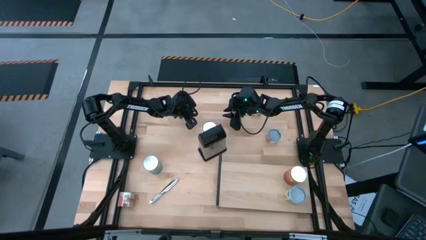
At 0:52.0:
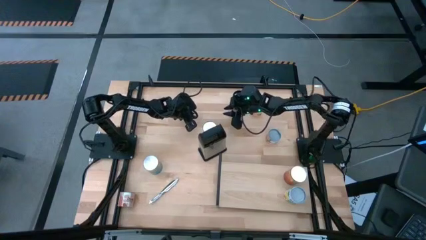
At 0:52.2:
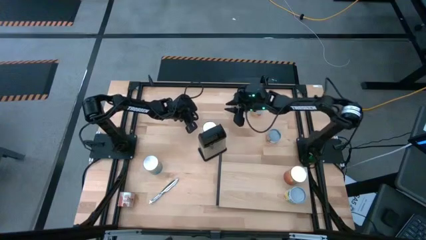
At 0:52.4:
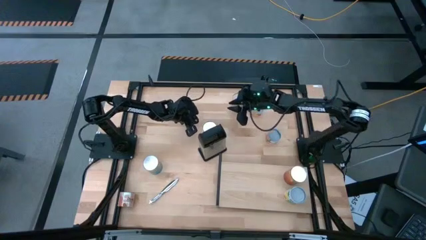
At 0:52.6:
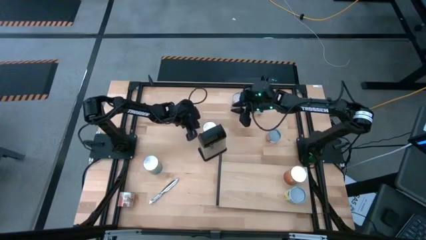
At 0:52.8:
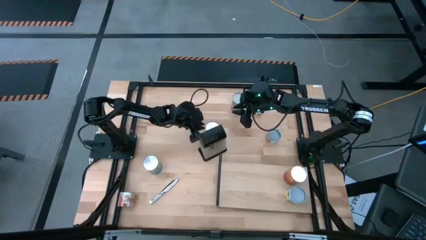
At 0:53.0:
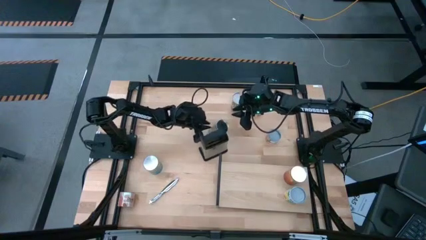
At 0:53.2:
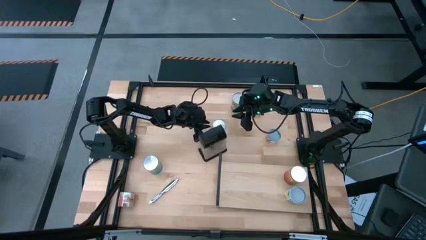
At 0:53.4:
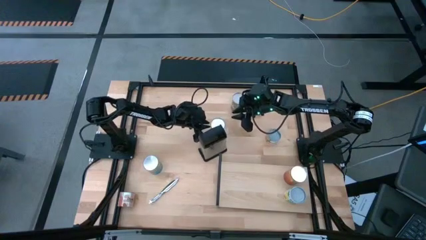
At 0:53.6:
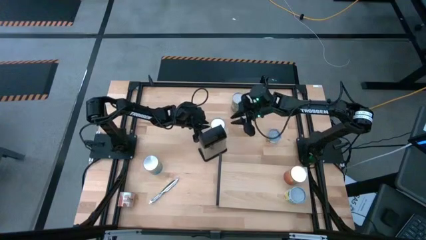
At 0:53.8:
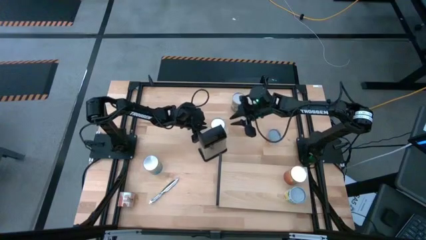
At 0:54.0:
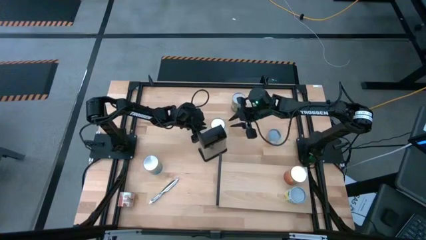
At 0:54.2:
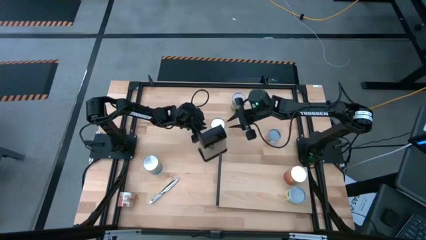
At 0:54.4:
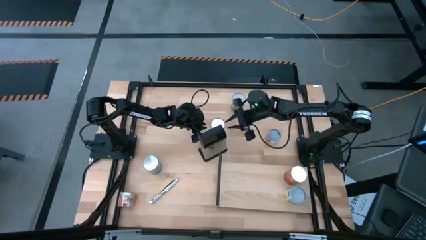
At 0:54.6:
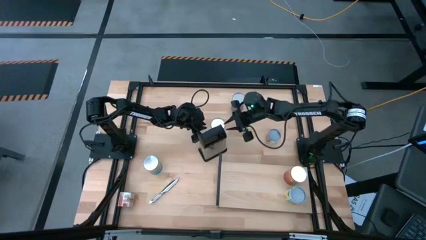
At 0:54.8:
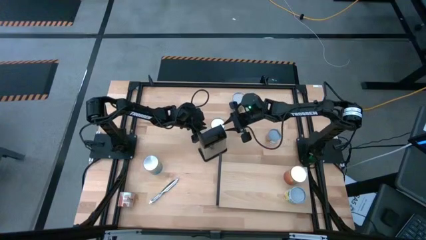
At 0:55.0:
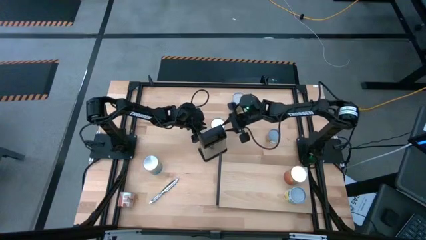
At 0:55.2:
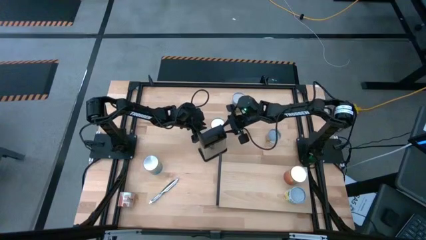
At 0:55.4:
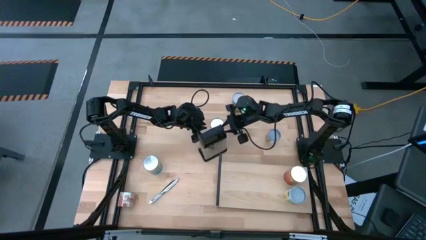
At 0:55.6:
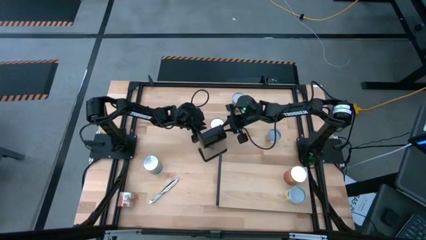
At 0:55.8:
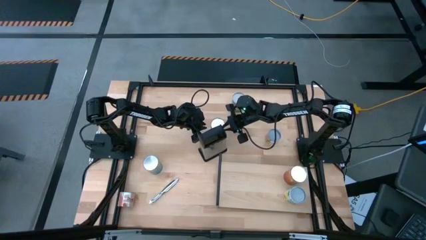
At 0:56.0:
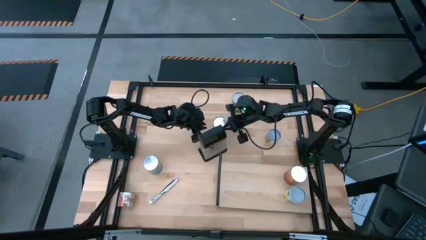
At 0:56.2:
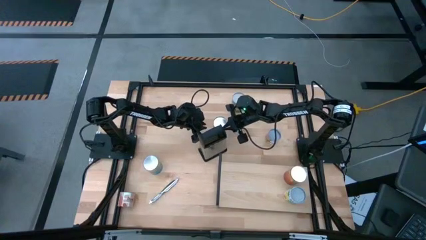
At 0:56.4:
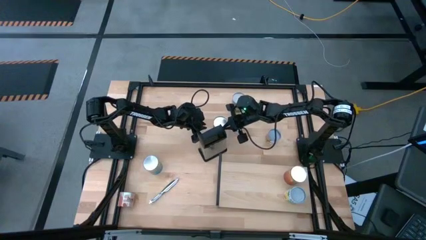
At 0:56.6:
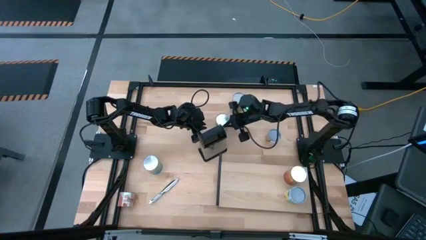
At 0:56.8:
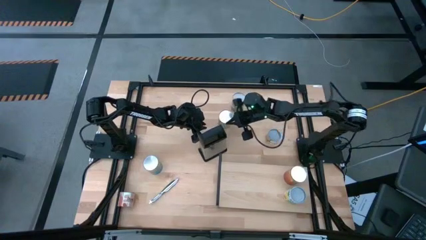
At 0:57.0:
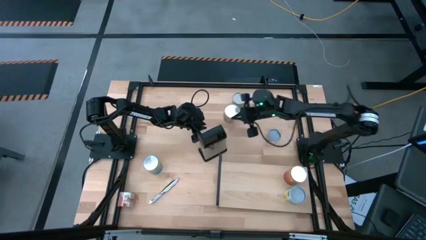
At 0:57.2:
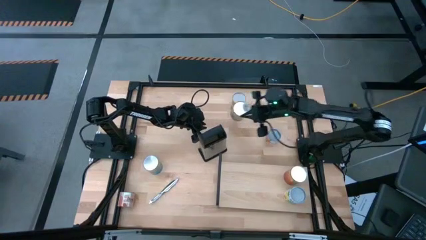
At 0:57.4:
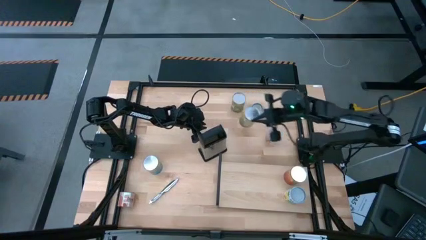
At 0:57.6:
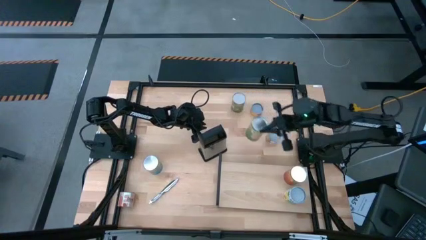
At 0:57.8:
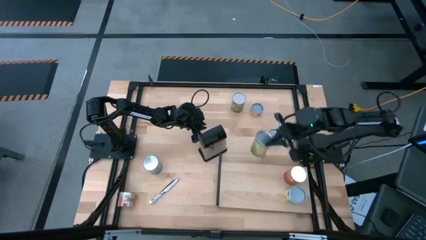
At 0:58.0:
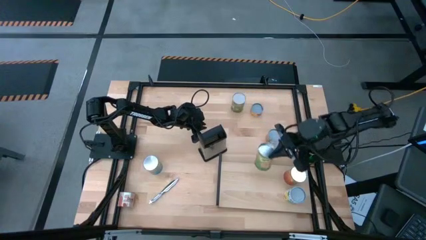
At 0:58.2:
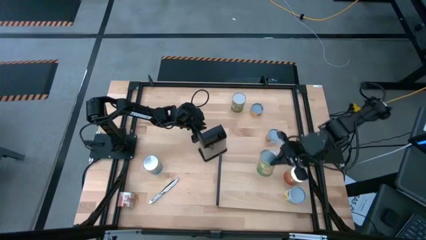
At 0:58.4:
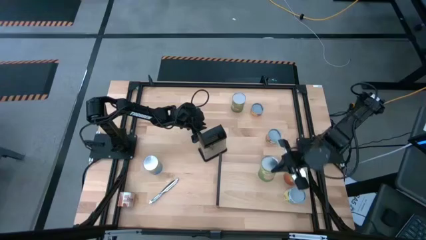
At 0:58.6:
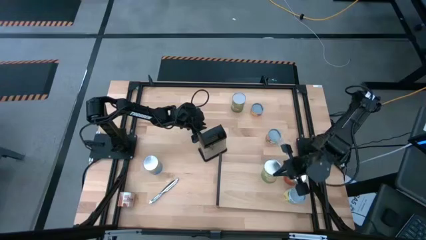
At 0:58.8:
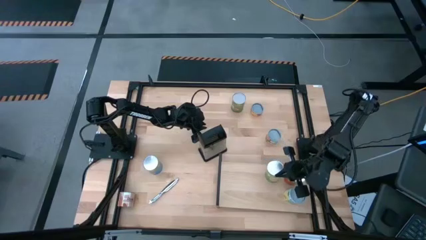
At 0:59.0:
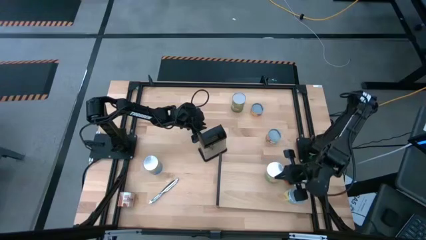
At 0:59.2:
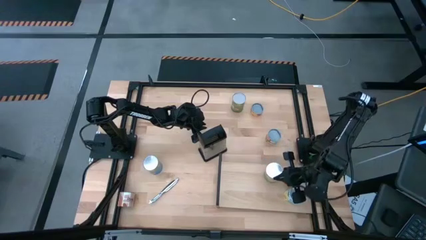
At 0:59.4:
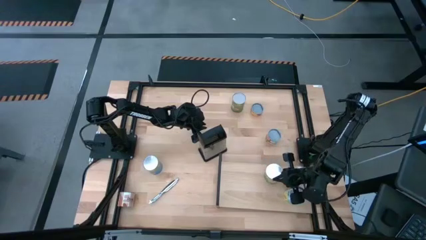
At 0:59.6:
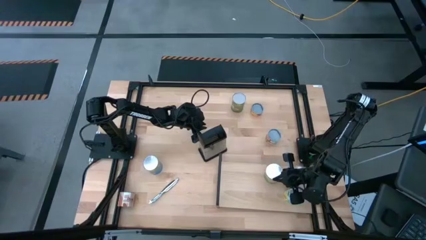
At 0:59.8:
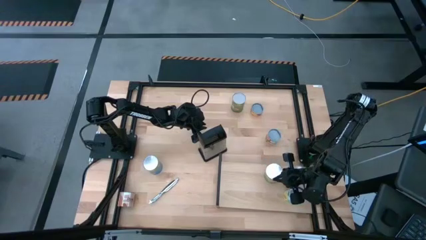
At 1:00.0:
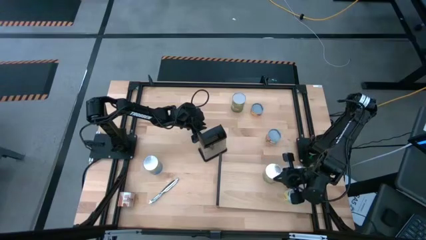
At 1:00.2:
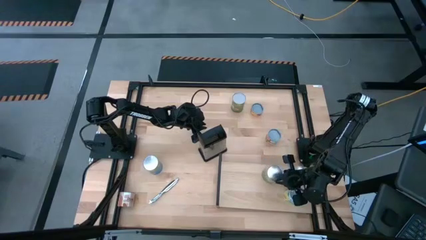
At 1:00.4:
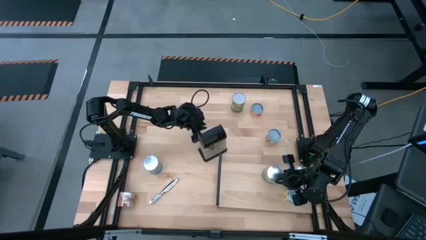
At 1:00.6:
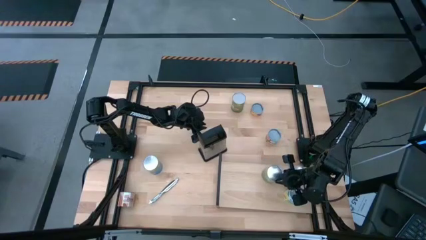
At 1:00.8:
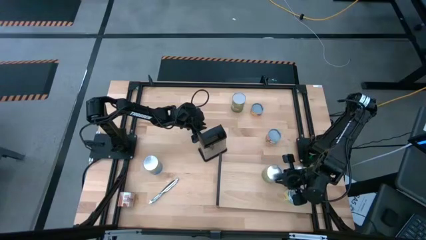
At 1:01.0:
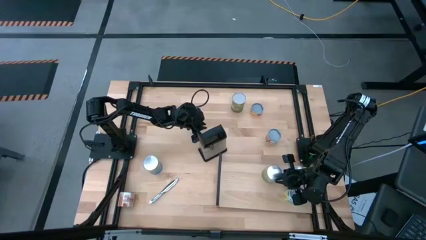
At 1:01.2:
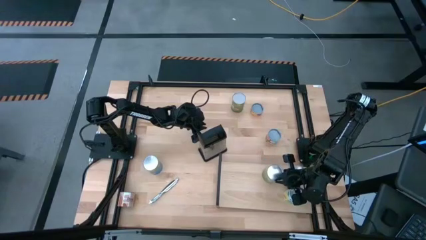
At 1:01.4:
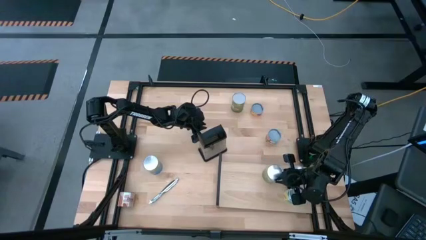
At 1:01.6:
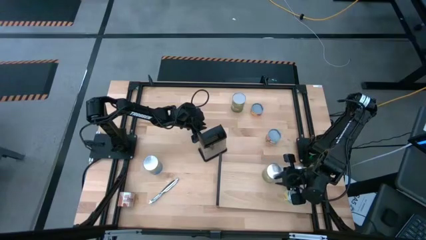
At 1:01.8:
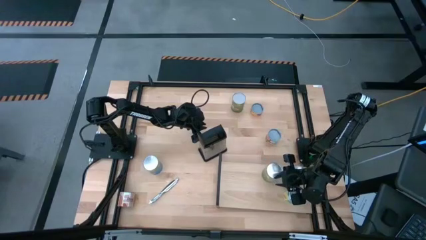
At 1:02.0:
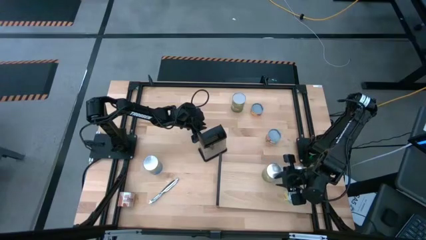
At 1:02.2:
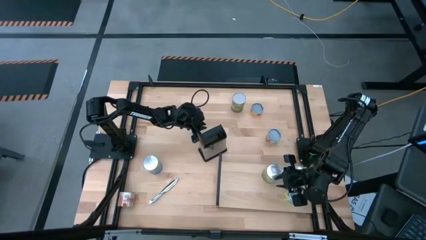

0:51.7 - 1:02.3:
Task: Pick and place cans onto a shelf
Put the large canned oranges on the shelf
